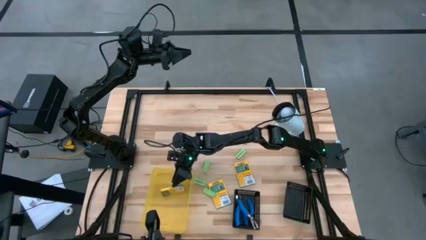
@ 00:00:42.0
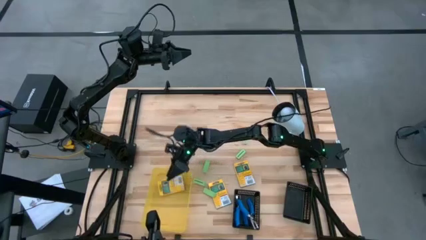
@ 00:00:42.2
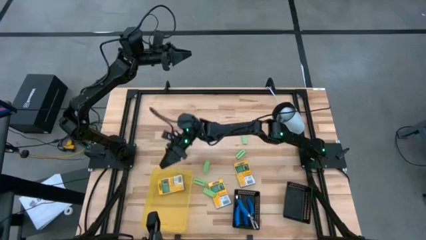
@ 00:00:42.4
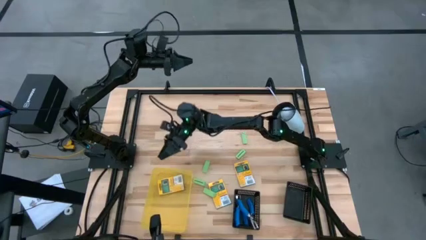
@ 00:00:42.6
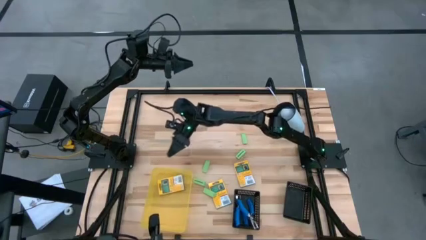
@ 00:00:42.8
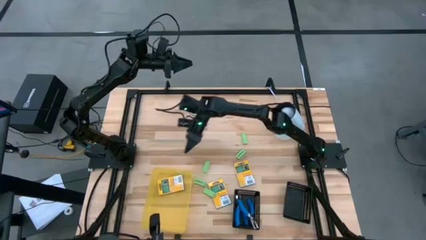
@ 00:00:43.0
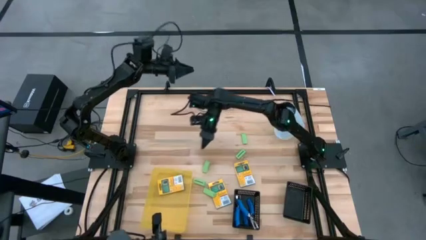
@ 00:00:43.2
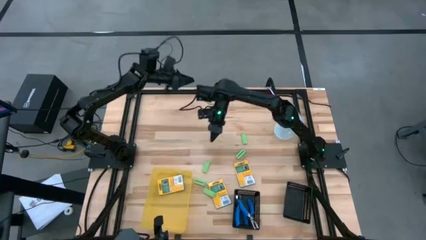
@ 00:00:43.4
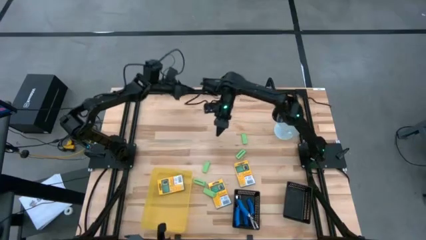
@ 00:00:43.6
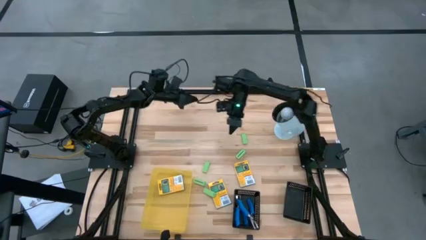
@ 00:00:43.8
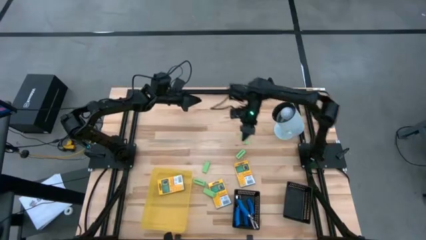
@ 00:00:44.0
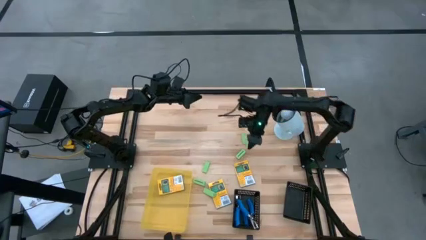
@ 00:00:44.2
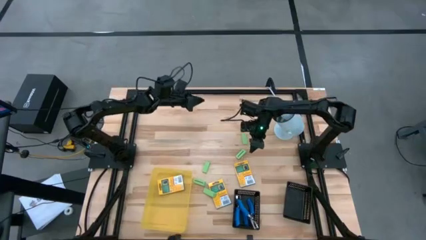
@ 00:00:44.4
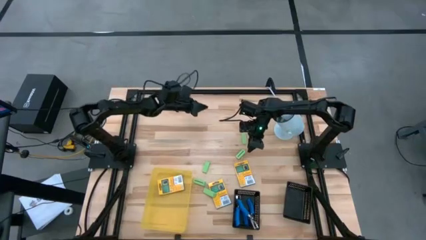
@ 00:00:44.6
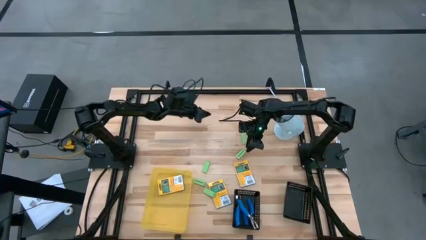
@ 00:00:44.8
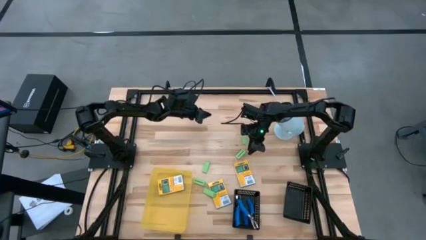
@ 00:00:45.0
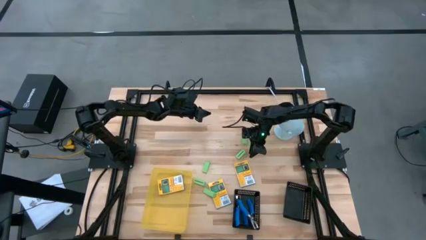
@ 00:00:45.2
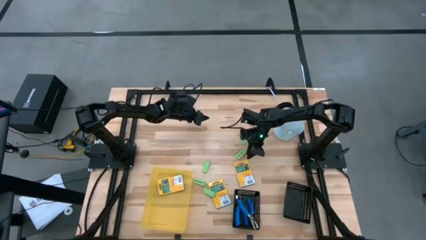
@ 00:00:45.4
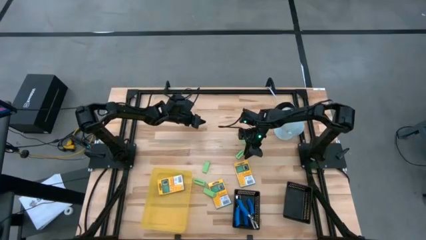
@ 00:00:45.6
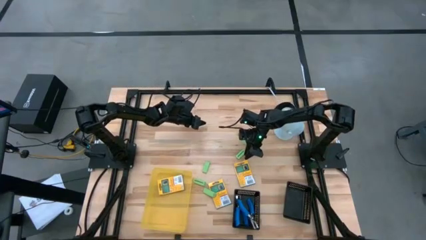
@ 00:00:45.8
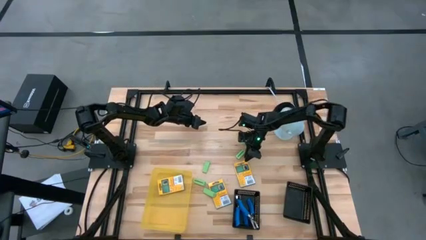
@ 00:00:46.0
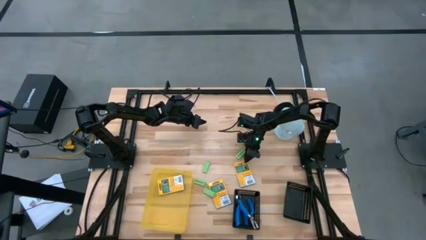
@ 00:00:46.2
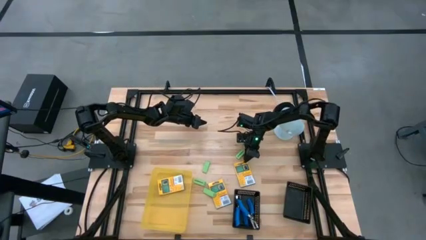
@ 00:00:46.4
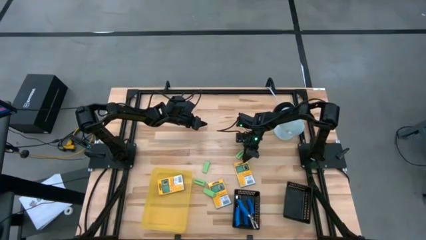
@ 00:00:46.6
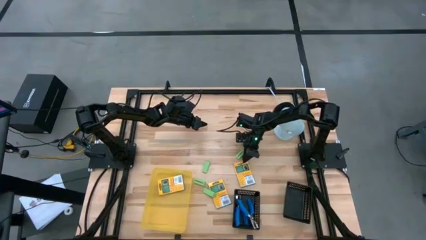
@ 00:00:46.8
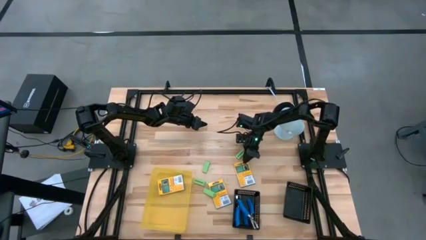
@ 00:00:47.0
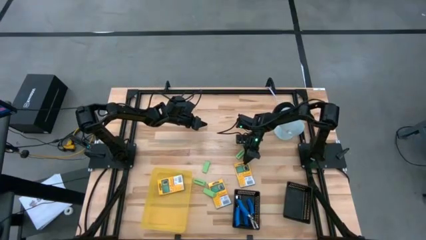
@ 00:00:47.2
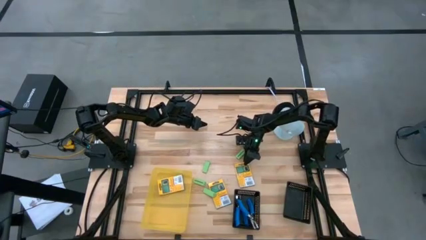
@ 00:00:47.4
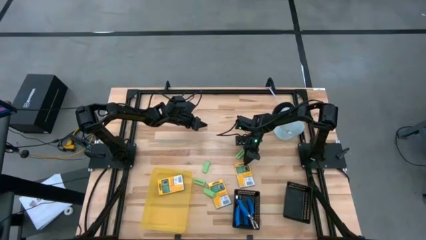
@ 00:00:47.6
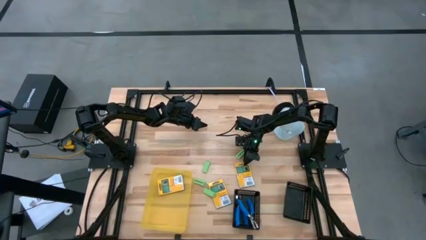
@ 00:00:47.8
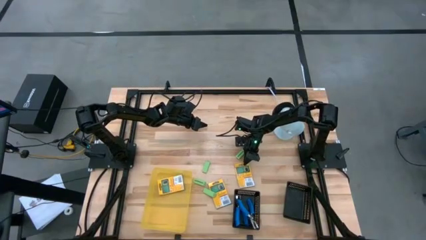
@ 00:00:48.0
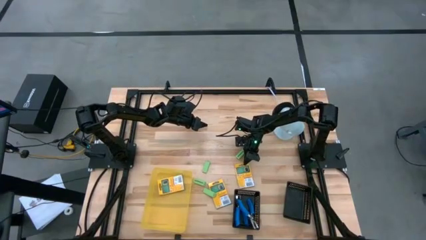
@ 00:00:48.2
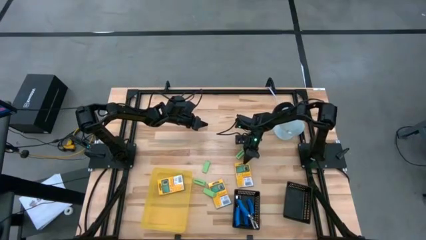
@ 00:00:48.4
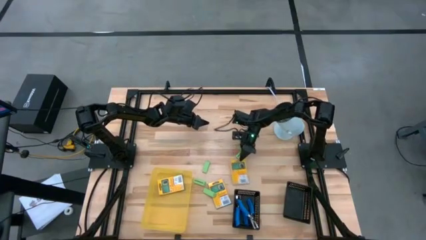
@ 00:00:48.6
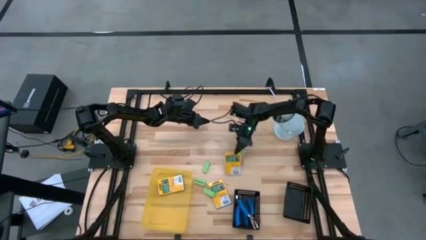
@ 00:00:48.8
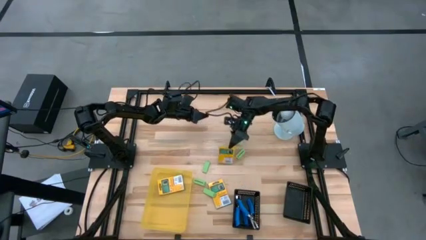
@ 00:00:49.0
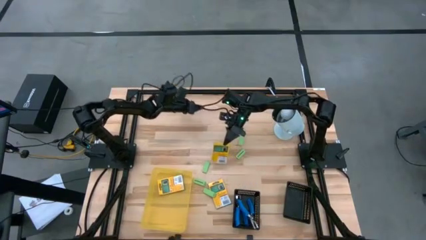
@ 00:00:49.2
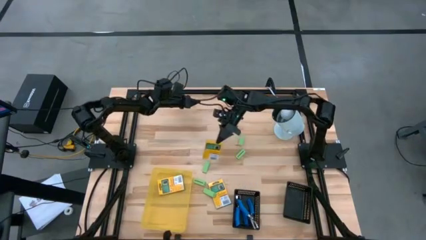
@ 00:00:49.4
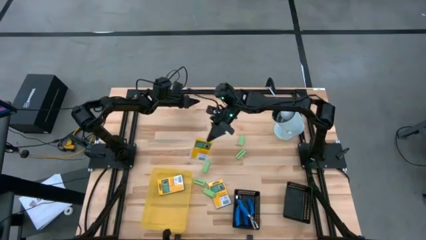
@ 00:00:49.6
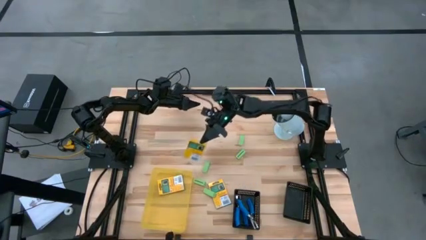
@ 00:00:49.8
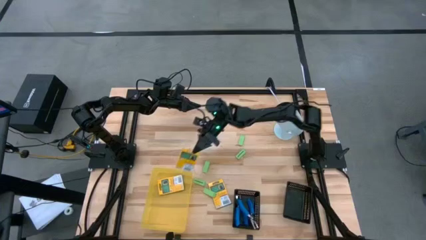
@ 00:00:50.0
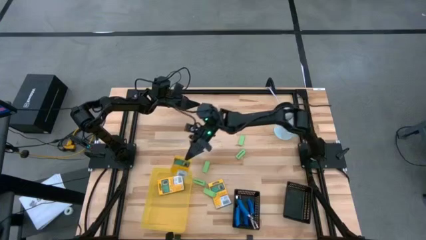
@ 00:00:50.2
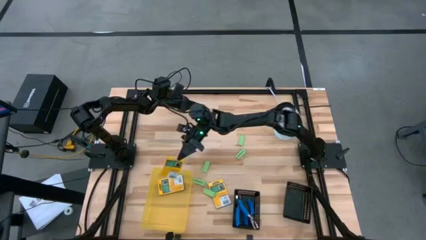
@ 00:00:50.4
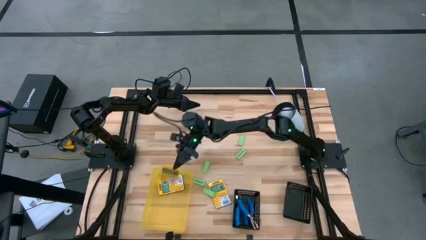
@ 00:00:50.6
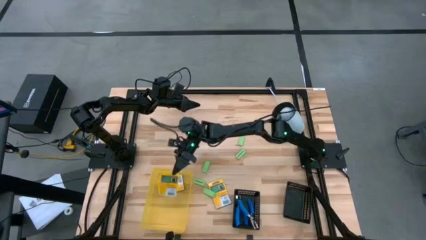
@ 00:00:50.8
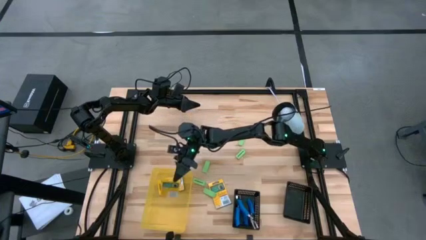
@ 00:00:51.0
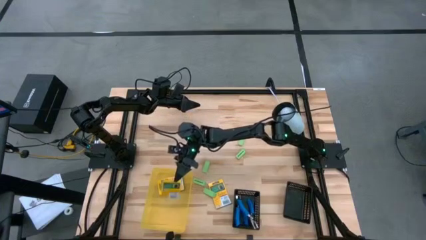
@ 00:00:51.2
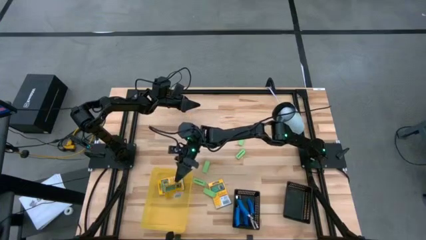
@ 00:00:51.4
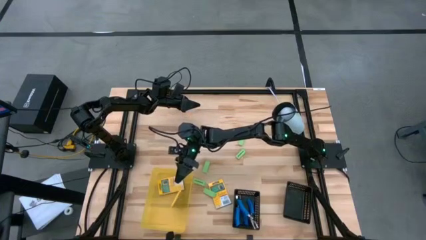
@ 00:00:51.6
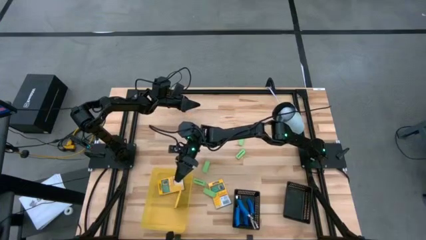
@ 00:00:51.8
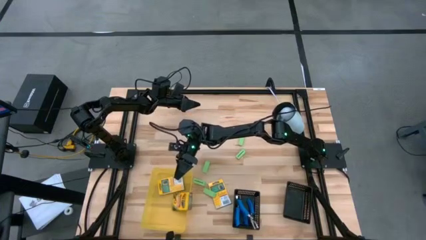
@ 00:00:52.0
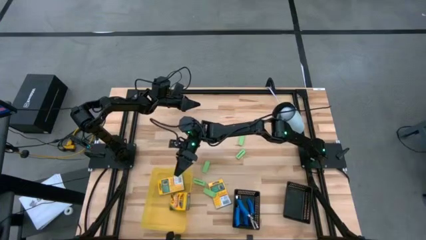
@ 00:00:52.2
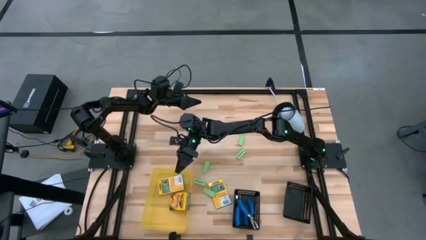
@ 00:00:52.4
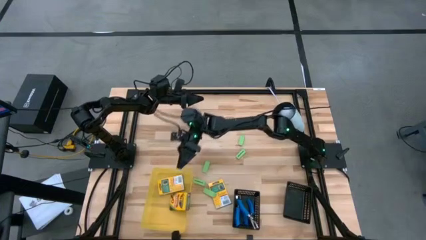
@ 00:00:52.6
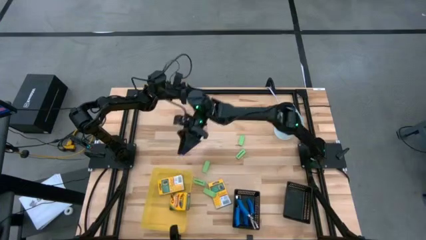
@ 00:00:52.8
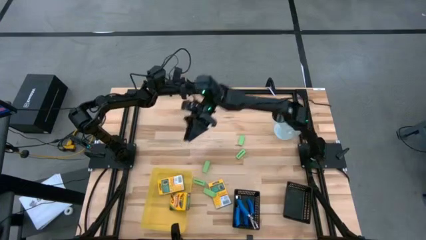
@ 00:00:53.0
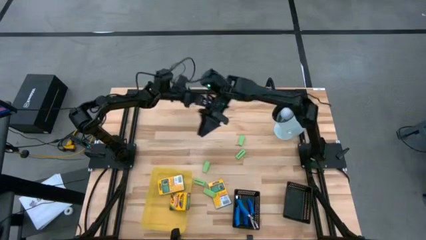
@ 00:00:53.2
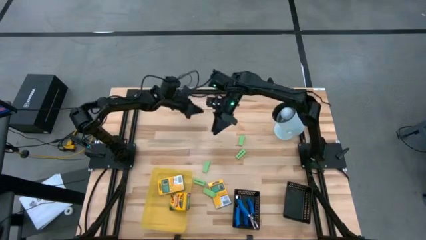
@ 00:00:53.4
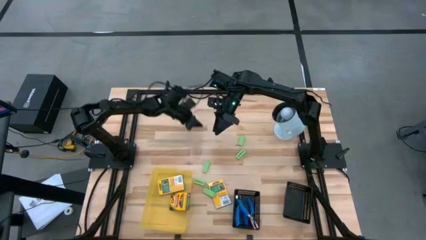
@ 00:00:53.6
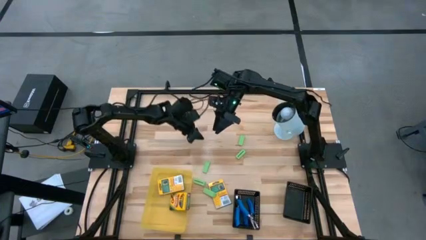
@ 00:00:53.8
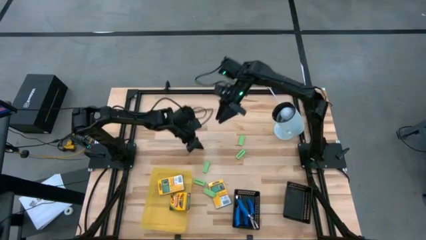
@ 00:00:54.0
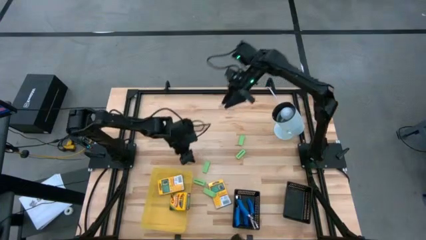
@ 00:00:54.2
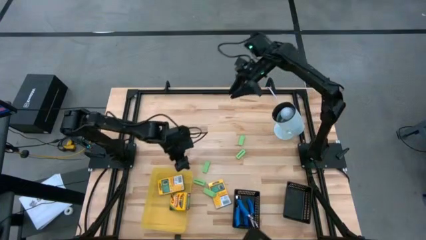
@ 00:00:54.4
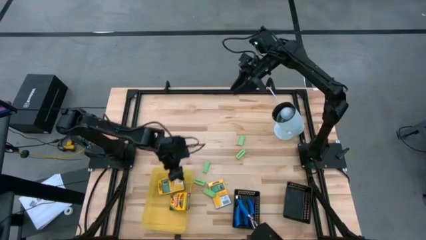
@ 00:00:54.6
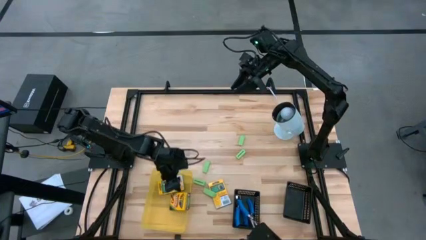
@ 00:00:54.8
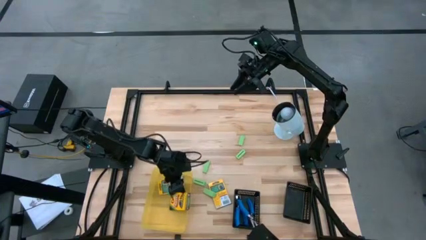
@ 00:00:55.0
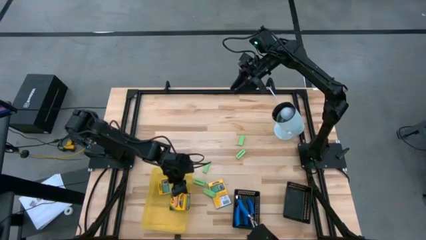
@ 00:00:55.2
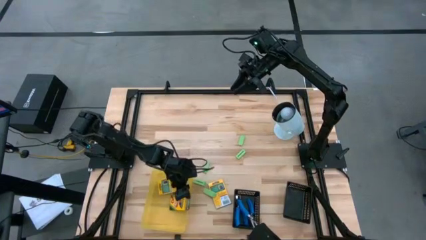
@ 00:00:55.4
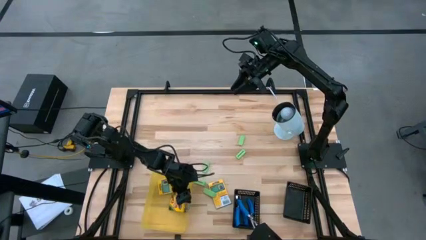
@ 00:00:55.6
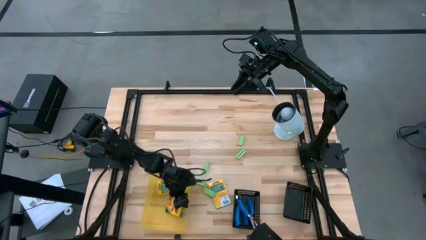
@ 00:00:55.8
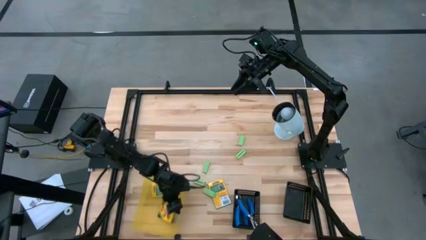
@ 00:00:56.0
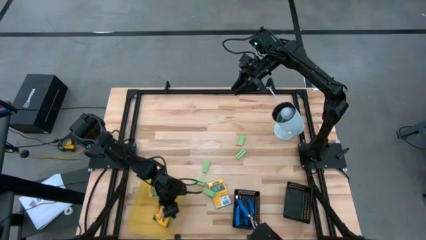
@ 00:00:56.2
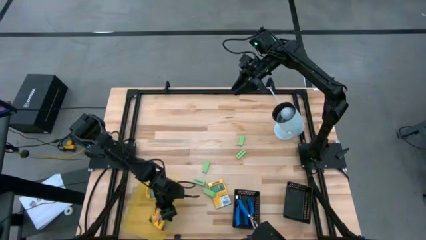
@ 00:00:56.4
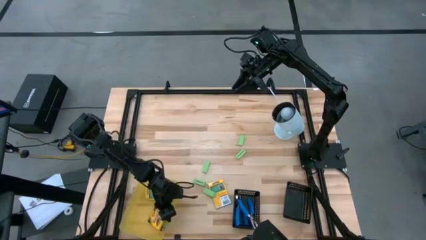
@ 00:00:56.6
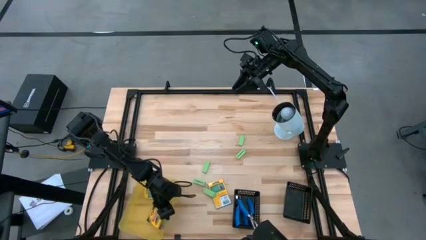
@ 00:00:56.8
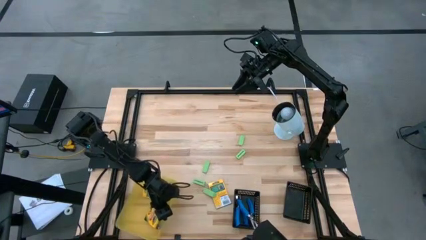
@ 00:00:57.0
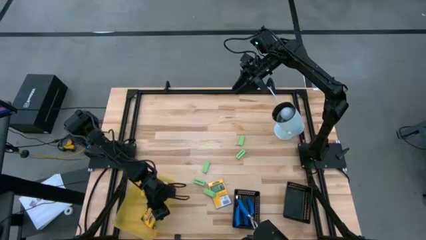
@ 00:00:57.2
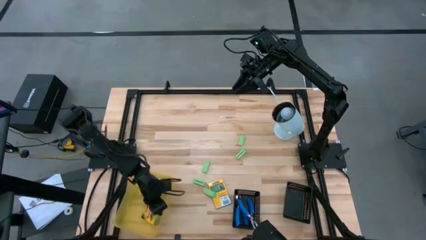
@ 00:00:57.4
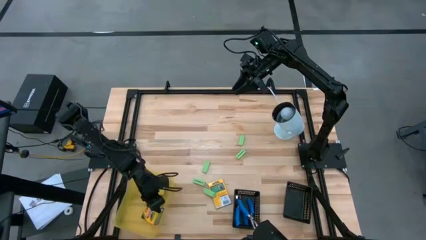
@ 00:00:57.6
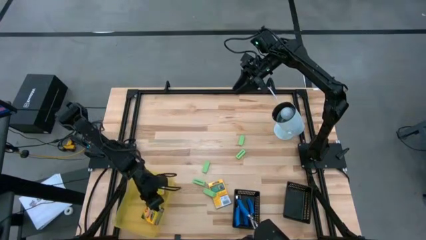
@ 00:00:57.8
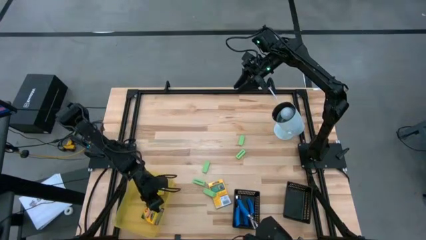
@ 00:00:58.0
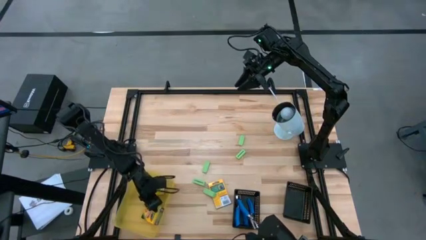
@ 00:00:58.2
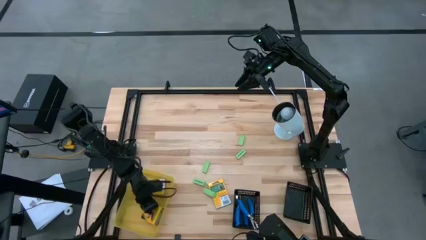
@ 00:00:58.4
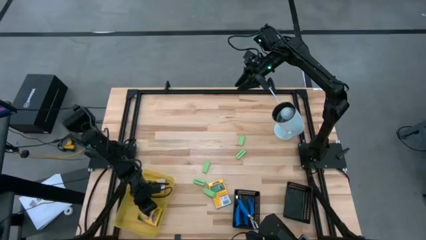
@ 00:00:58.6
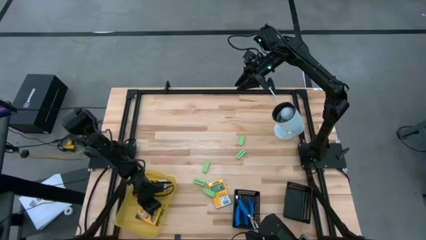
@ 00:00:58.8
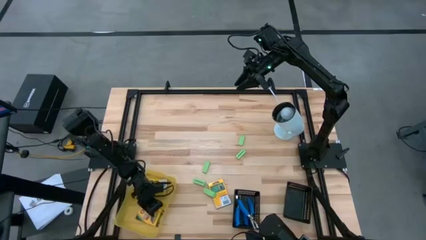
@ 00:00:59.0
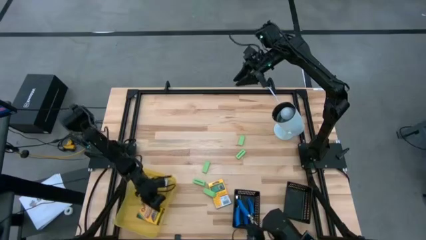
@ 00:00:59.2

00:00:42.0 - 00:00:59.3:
Task: Pick & Place School Supplies
Put the yellow crayon box into the yellow bin
